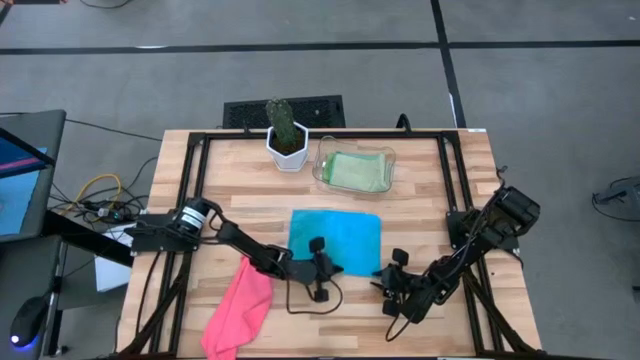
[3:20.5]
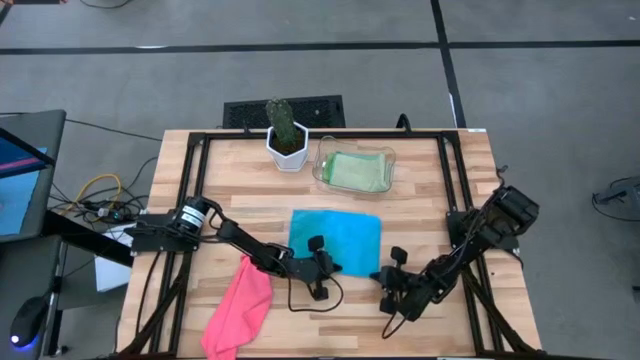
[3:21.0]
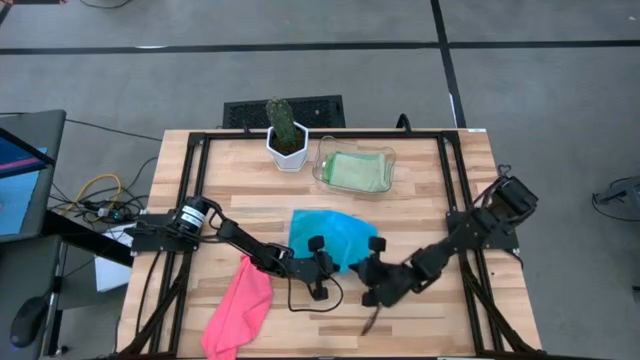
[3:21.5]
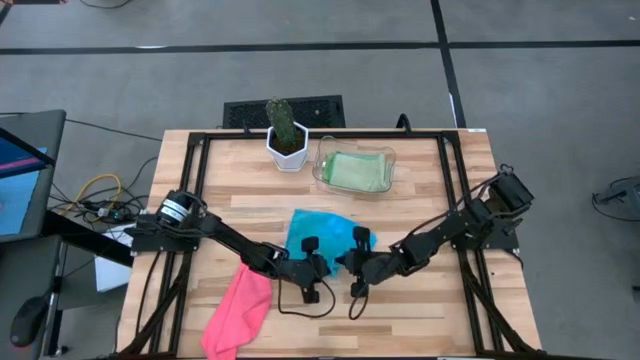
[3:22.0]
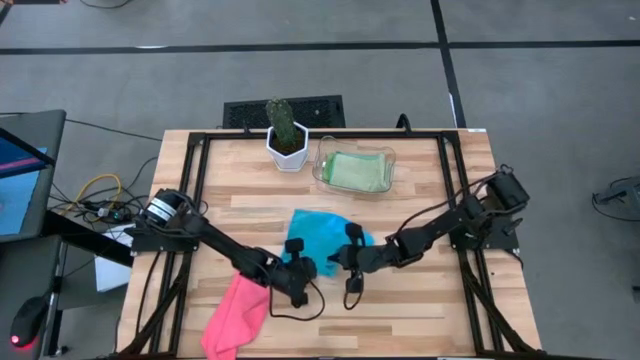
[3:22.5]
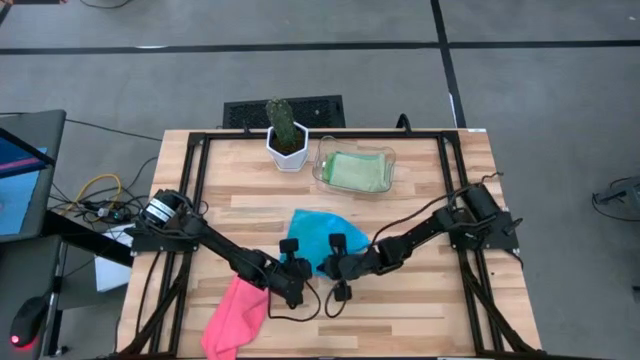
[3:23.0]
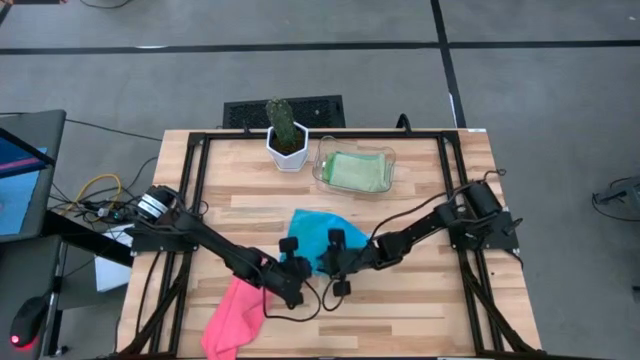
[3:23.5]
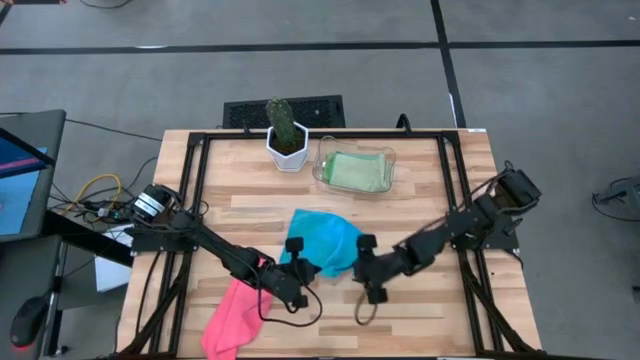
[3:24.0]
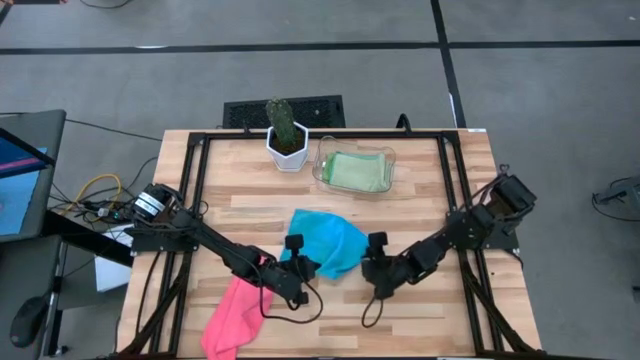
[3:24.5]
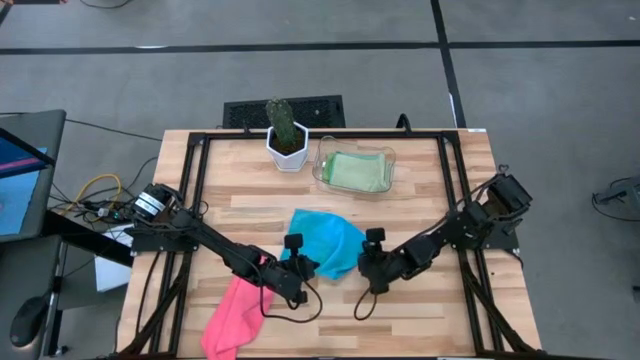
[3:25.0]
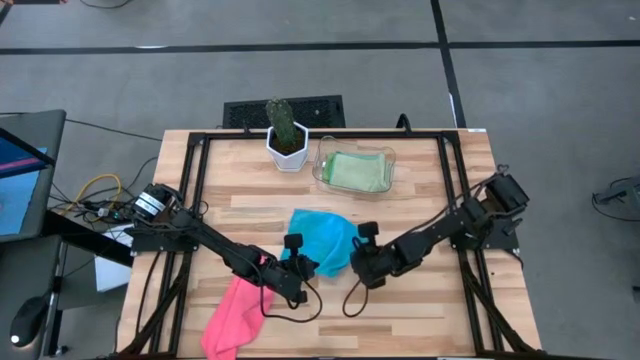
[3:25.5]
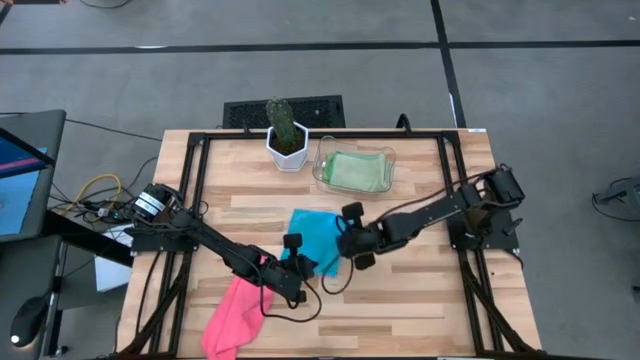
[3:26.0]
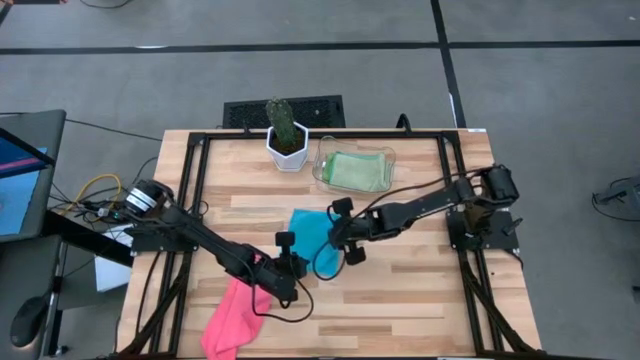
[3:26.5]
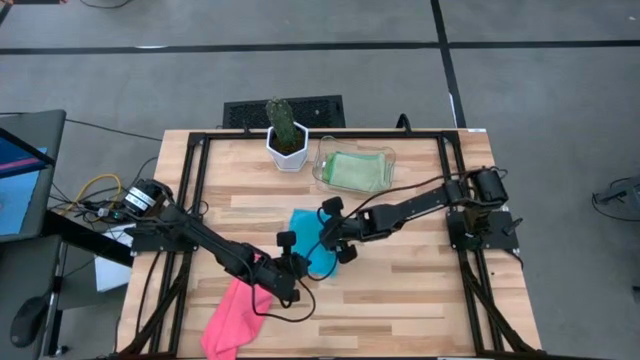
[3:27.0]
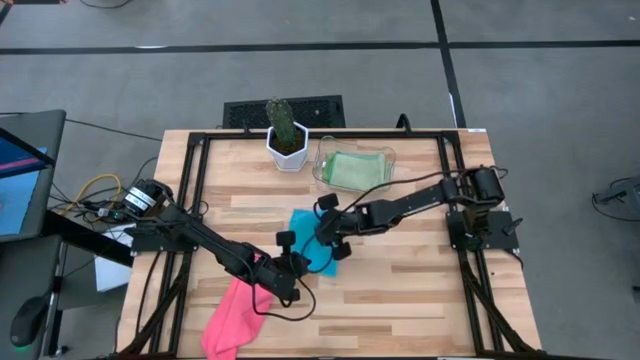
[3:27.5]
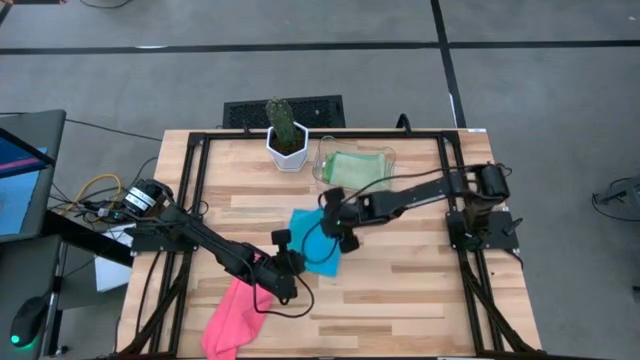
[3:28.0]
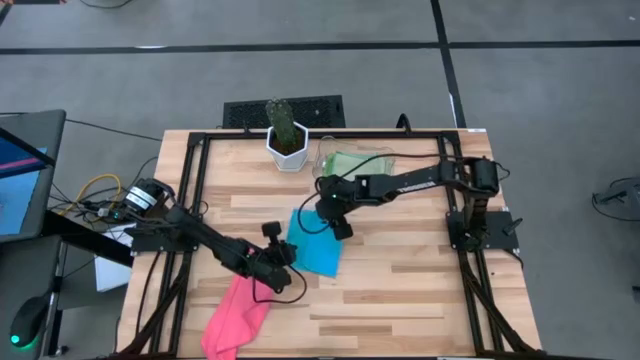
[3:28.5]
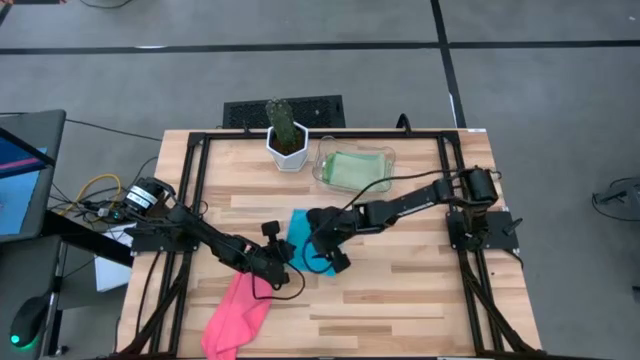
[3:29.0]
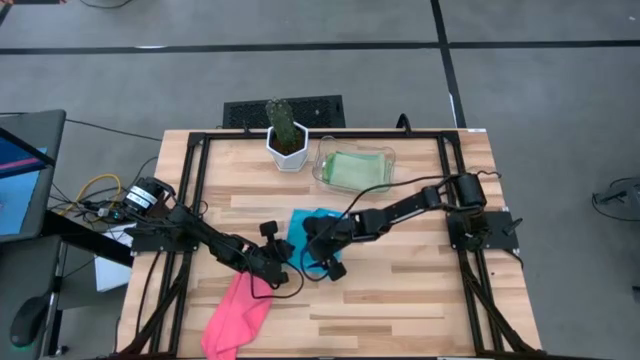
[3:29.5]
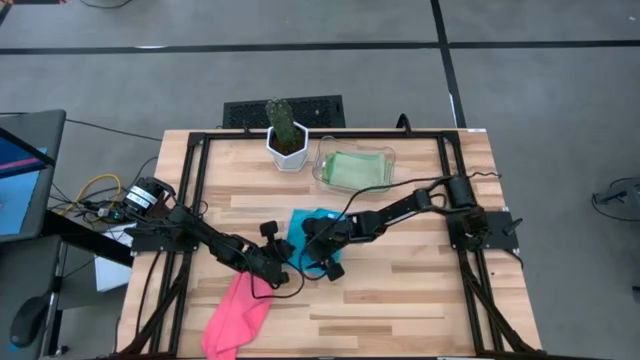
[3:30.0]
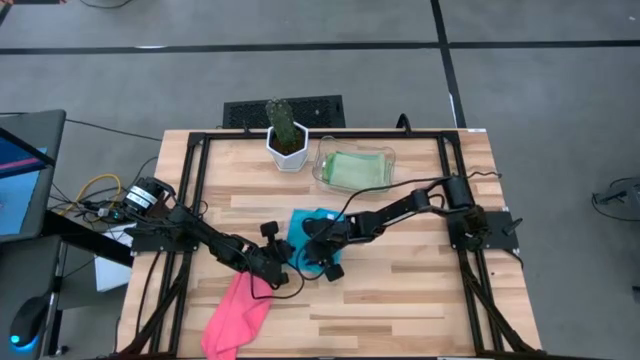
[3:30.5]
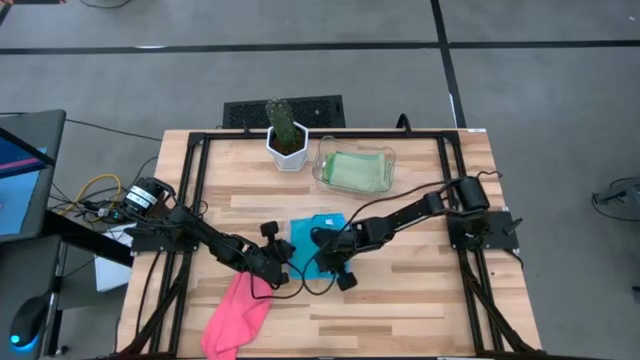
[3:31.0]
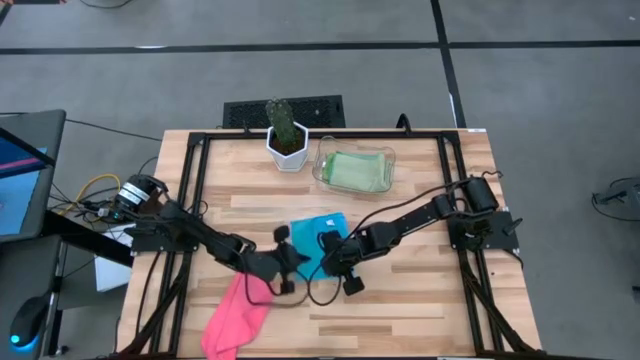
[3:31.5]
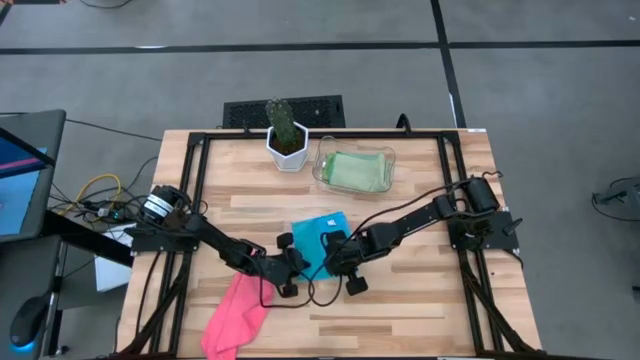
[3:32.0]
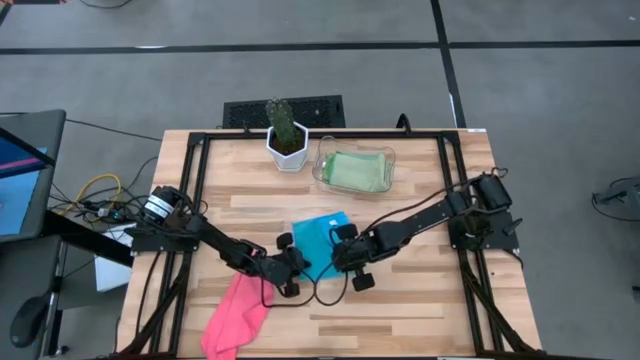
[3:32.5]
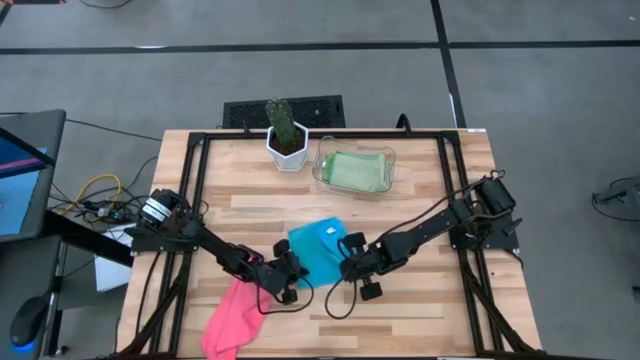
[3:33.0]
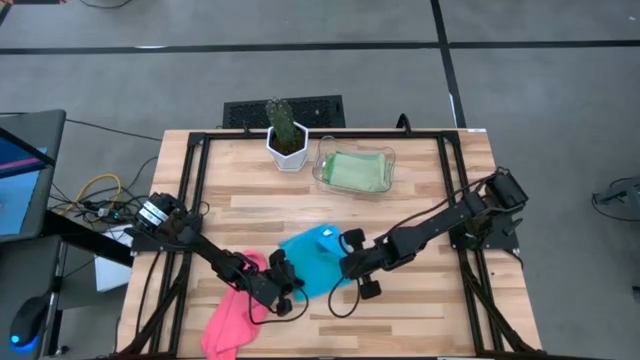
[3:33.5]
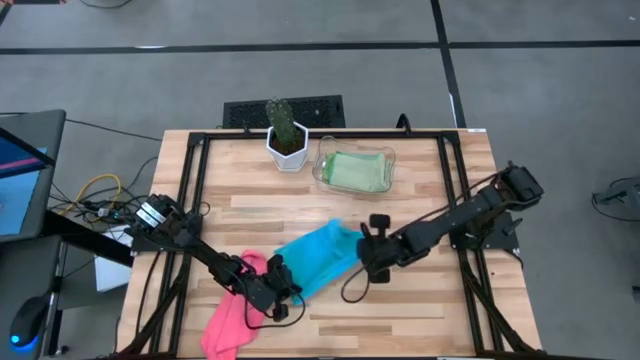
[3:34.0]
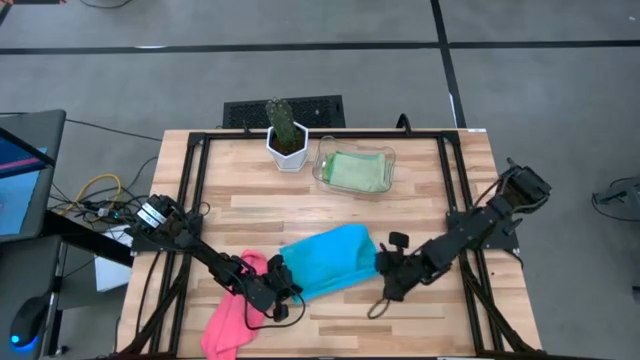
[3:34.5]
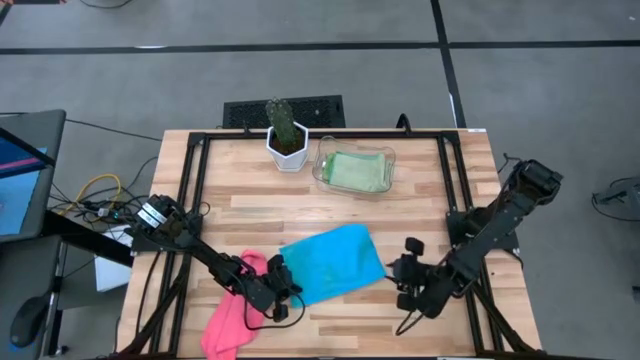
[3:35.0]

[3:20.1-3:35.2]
Task: Fold microfiber towels
Fold the blue towel on the table

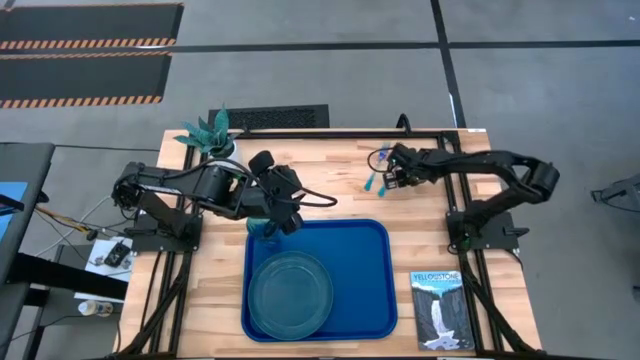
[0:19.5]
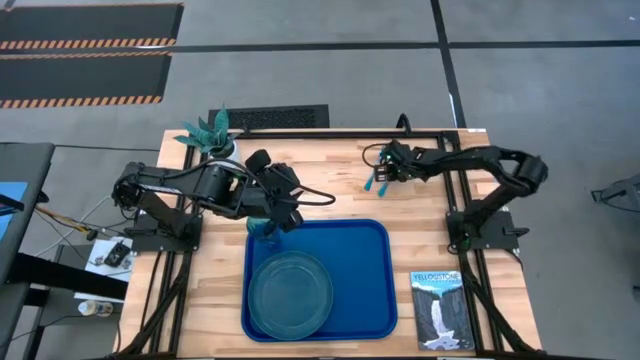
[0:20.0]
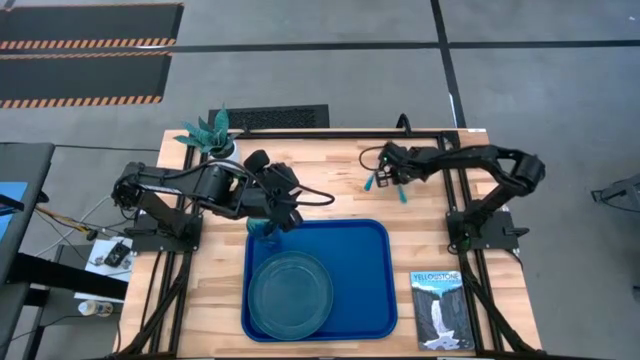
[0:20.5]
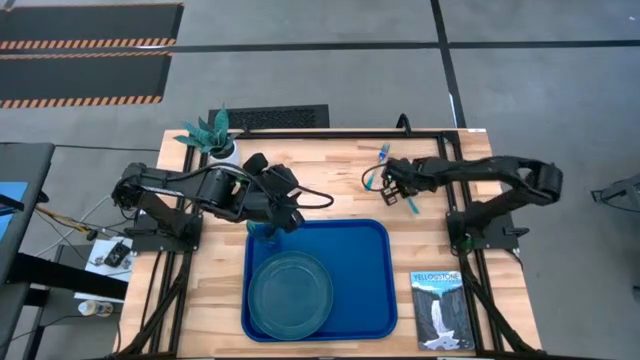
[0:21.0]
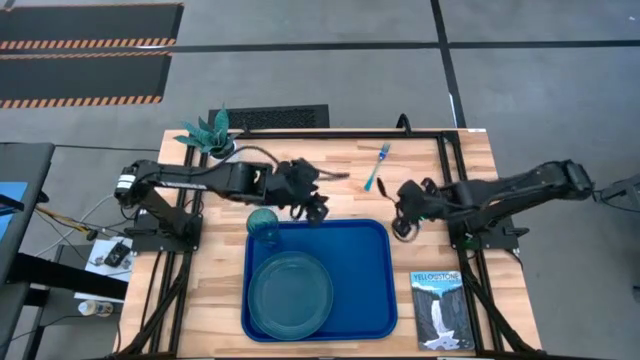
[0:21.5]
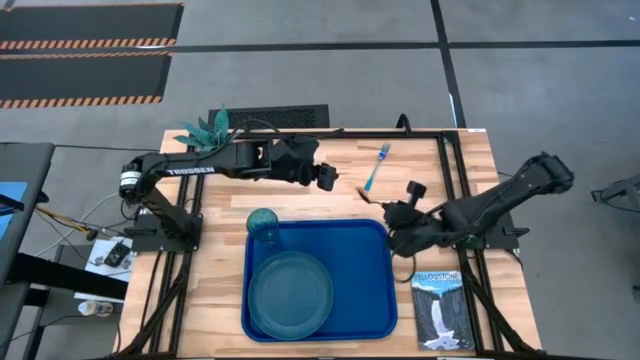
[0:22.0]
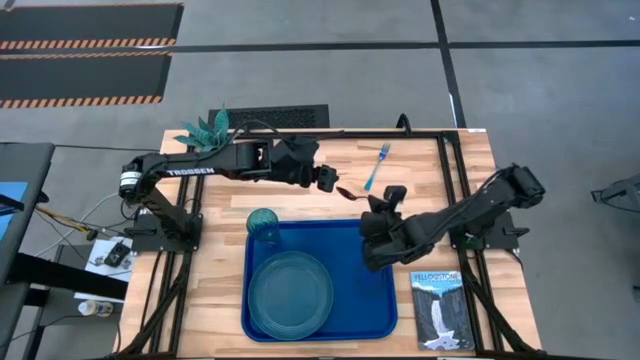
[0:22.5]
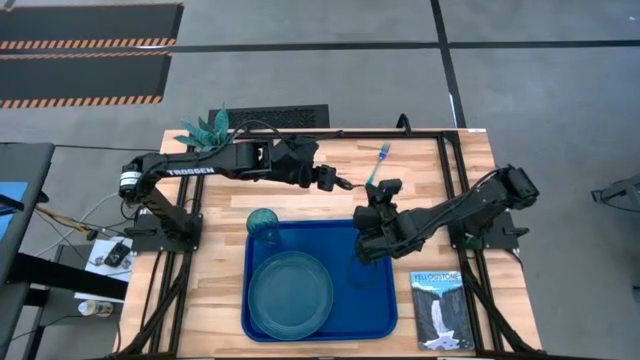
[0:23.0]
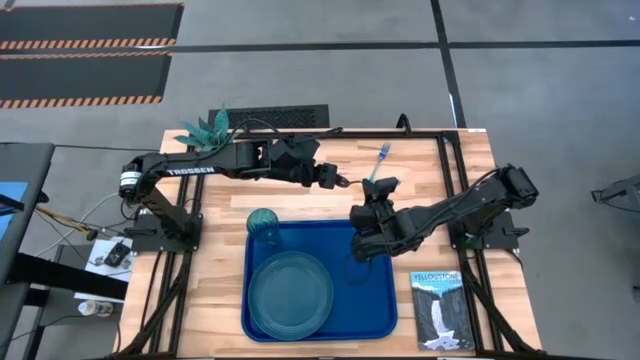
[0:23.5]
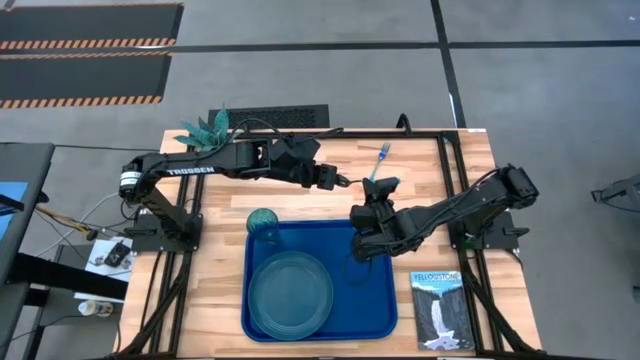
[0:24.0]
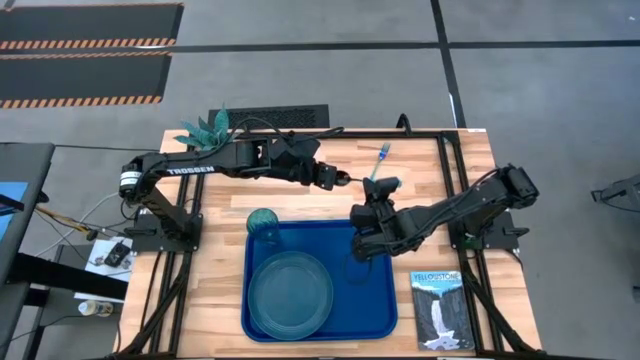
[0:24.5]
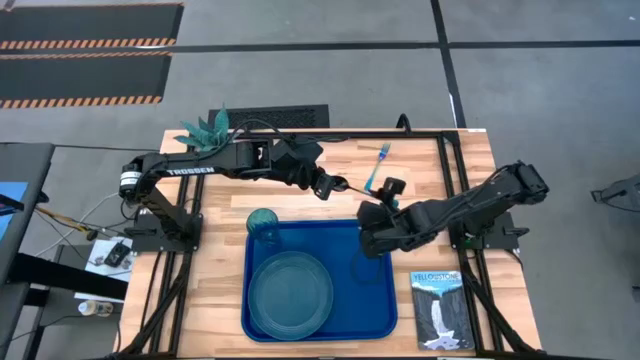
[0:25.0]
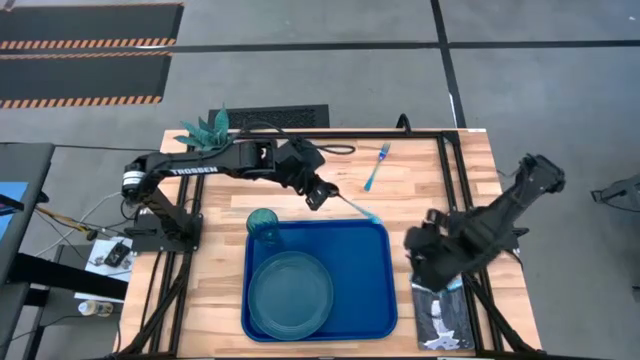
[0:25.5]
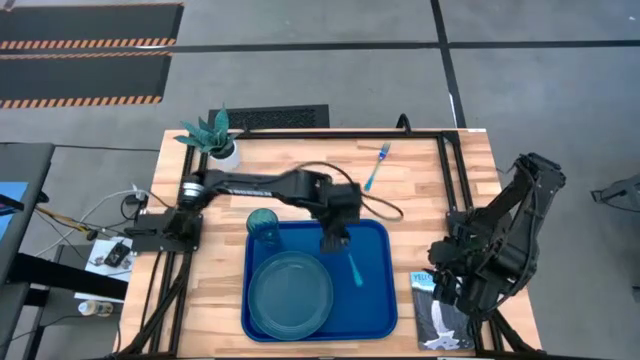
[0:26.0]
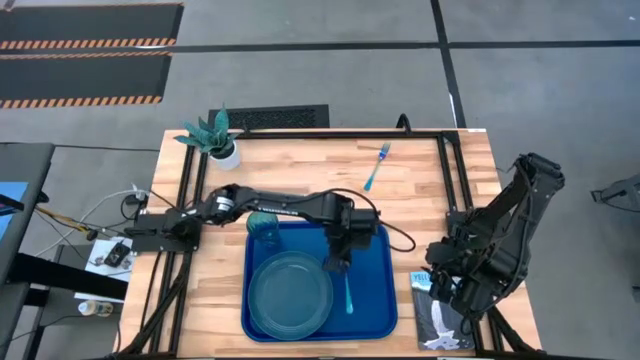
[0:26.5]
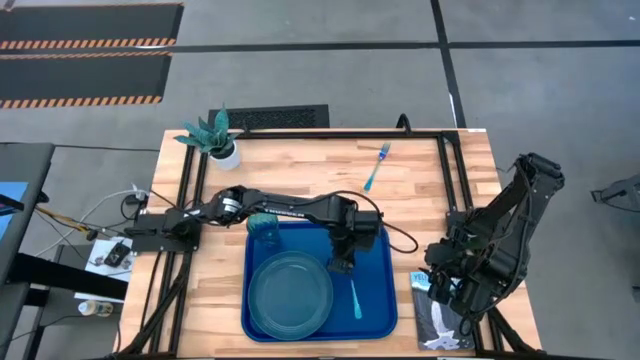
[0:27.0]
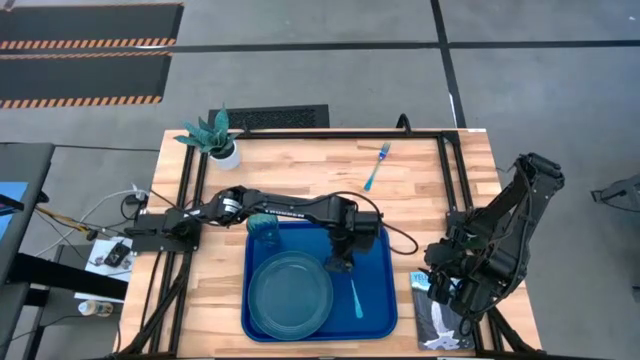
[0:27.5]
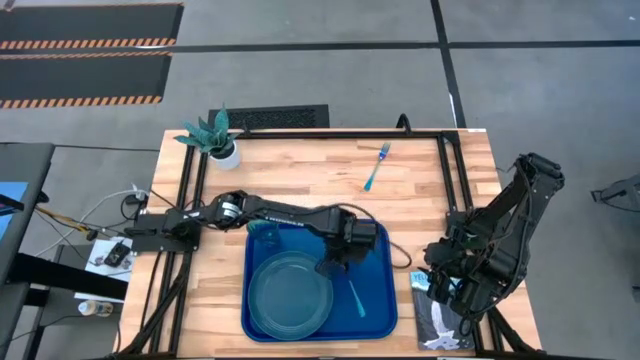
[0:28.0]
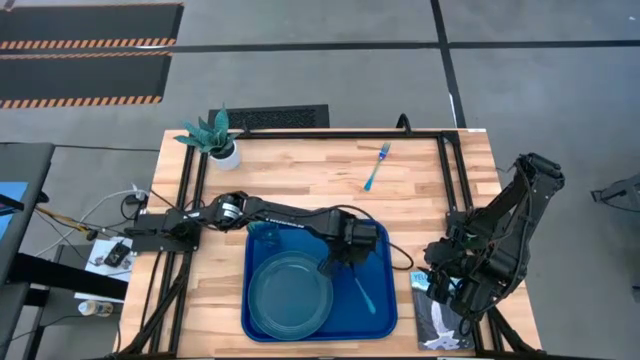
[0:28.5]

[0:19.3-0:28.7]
Task: Pick and place plate/cup/fork/spoon on tray
Put the blue spoon on the blue serving tray to the right of the blue plate
